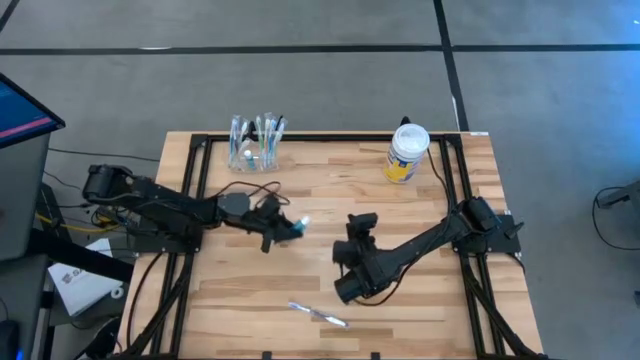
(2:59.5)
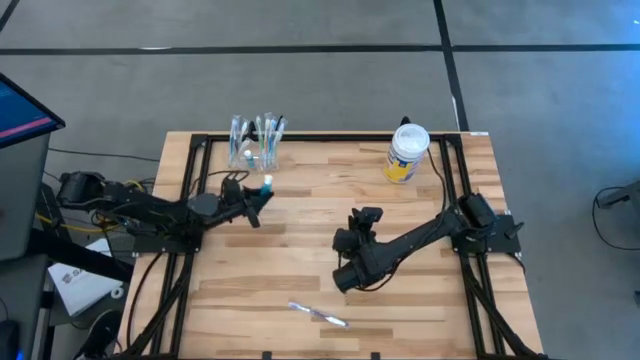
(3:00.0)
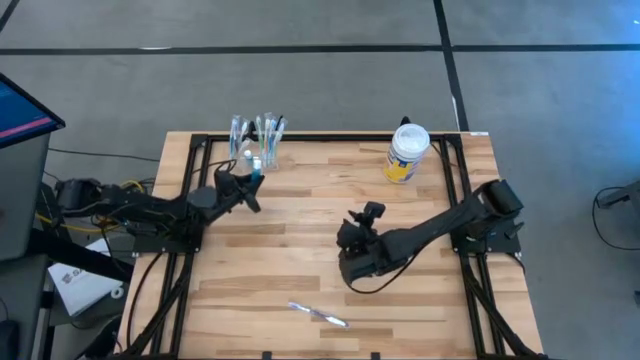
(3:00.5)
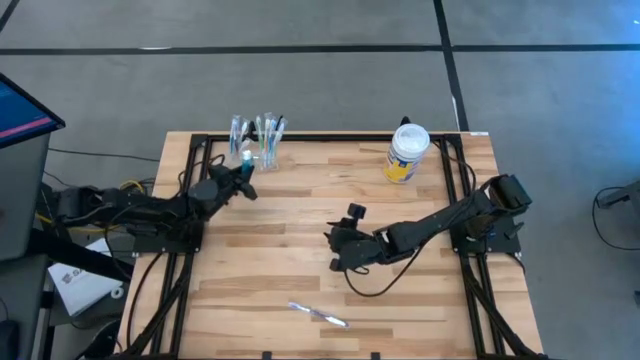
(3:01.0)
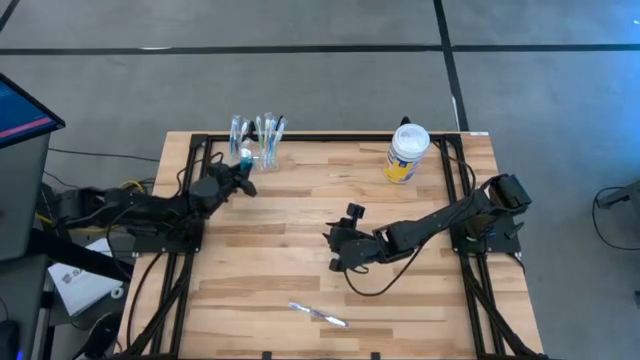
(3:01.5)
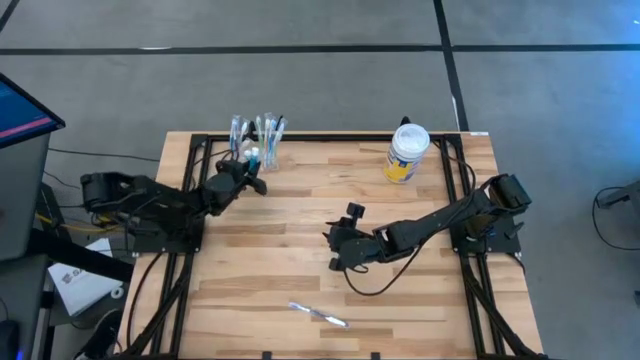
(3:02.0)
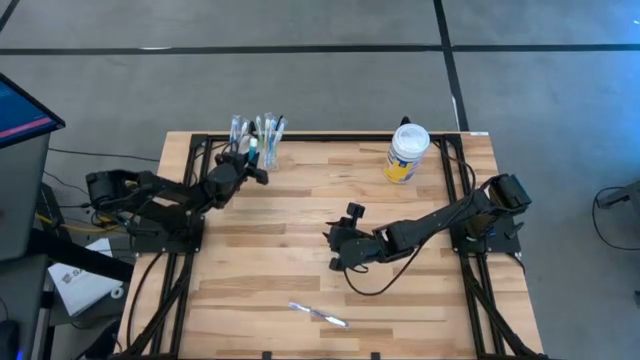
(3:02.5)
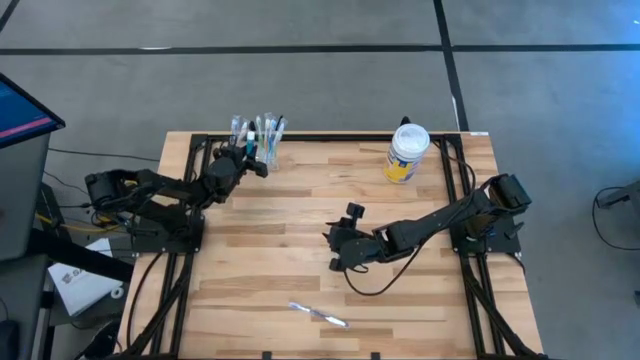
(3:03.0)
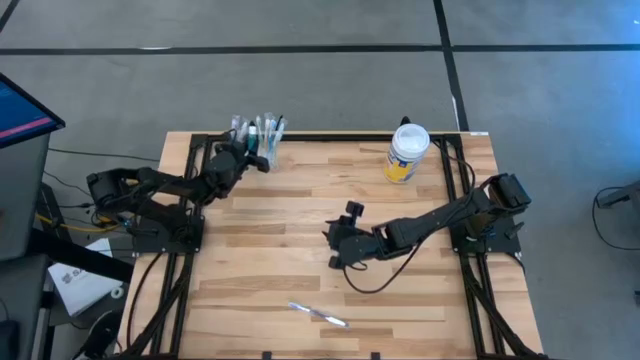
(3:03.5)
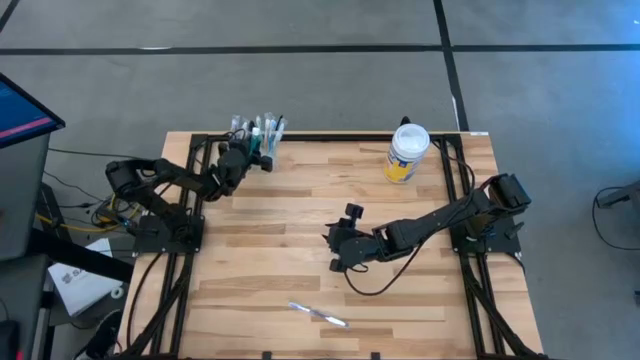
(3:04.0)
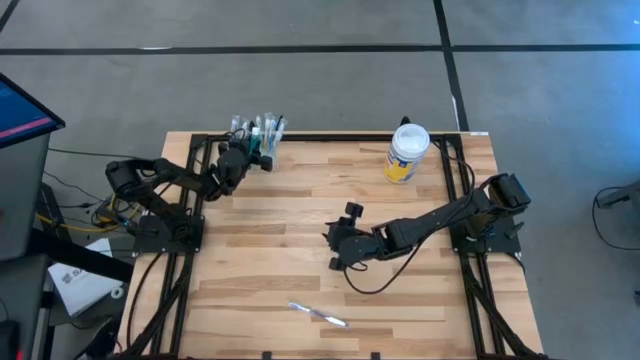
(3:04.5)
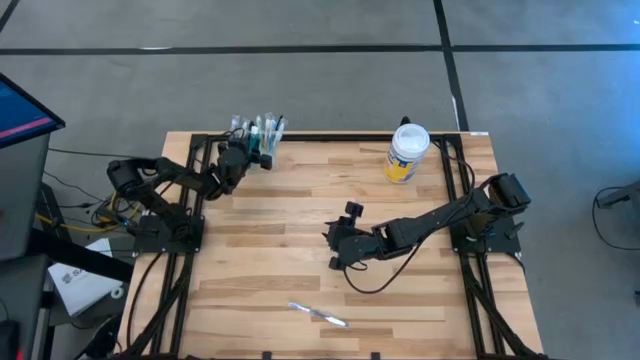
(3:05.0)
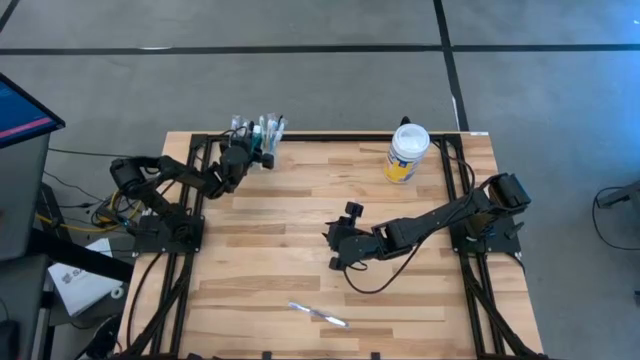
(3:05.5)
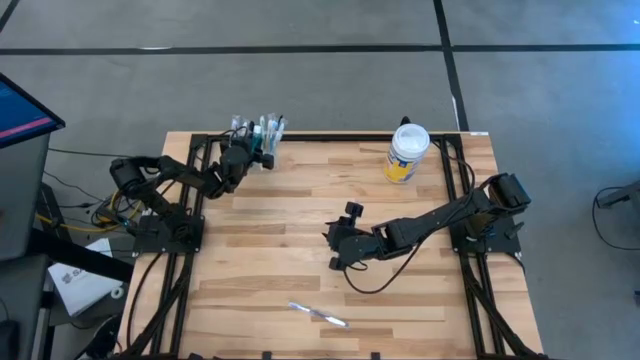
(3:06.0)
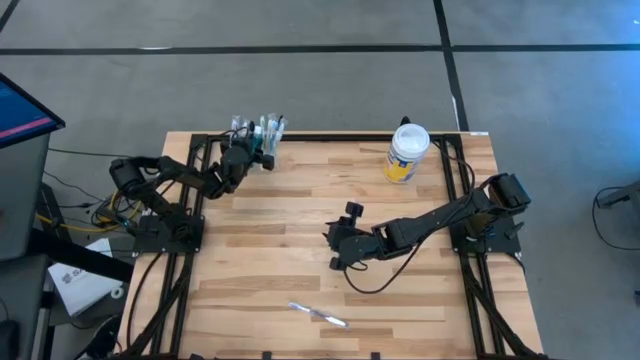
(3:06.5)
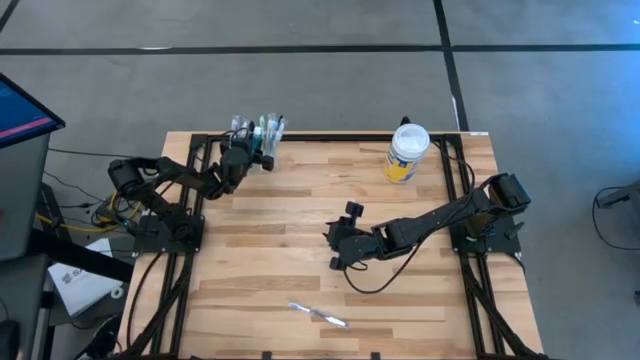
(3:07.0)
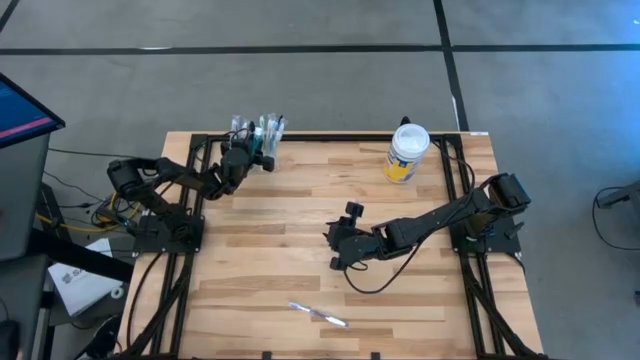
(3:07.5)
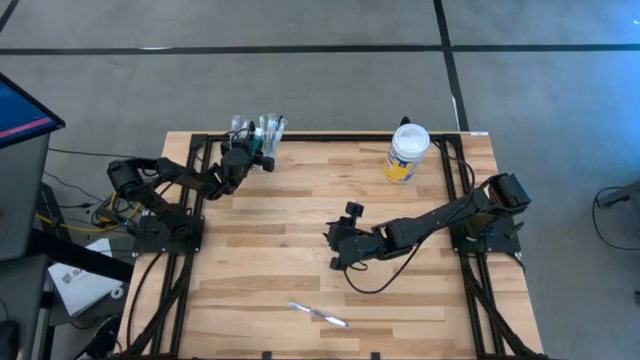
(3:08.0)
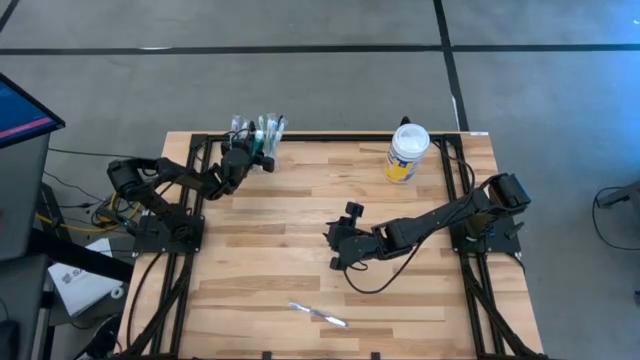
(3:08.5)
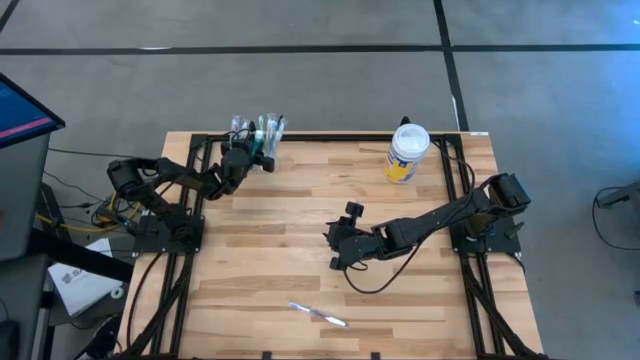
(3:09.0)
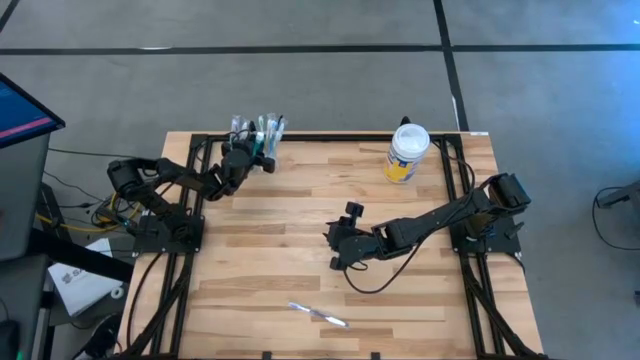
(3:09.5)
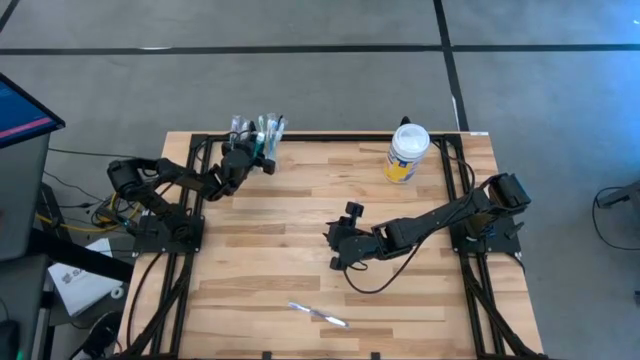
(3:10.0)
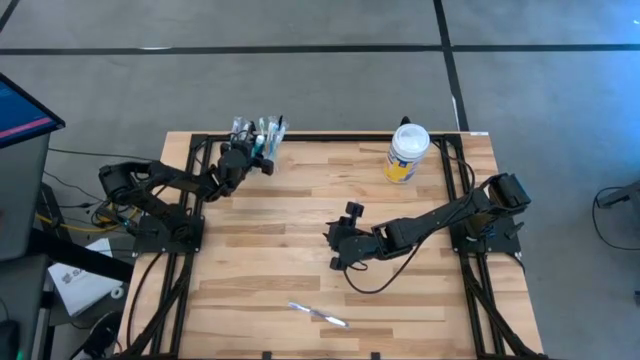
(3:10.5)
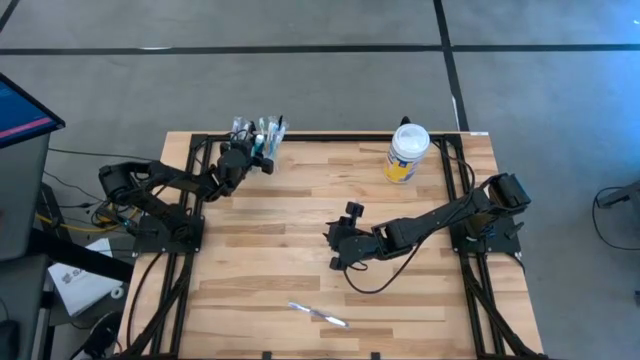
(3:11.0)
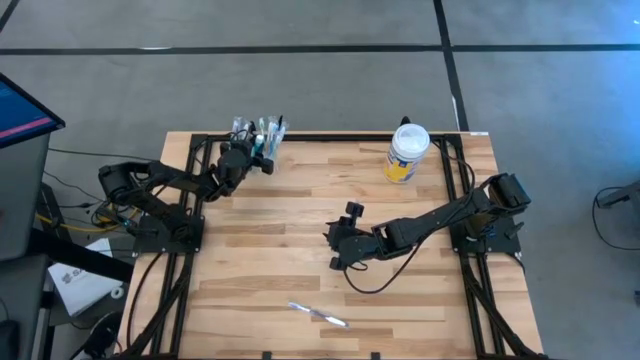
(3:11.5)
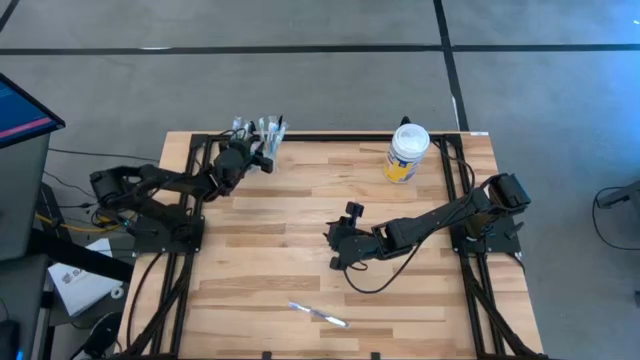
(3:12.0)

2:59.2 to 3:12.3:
Task: Pick & Place toothbrushing station
Put the blue mouthwash into the transparent organizer
